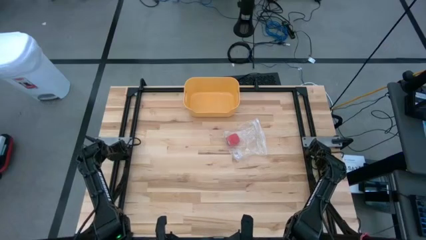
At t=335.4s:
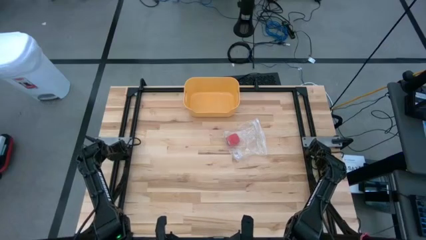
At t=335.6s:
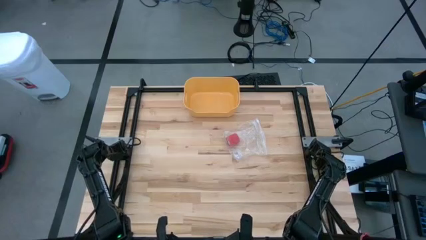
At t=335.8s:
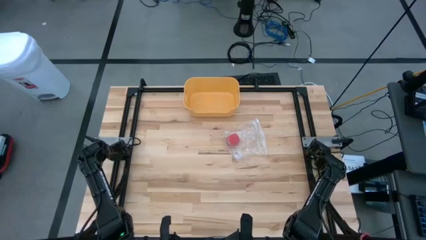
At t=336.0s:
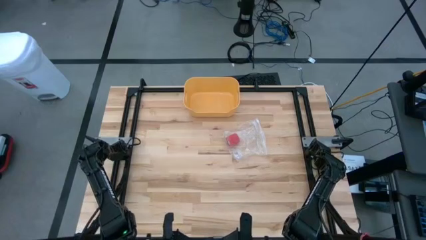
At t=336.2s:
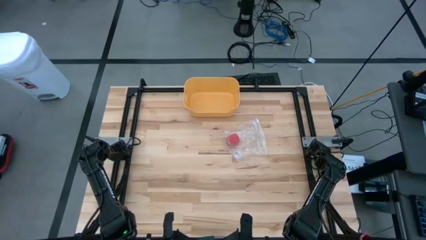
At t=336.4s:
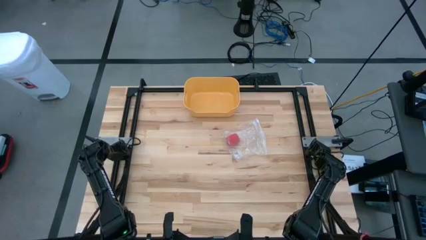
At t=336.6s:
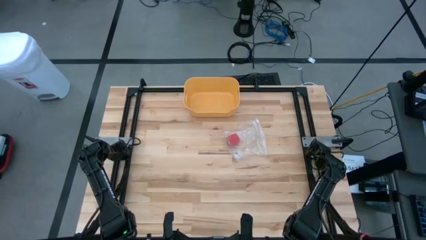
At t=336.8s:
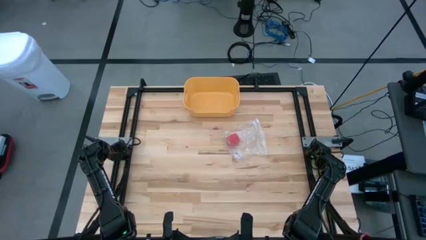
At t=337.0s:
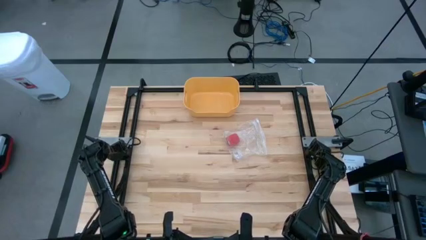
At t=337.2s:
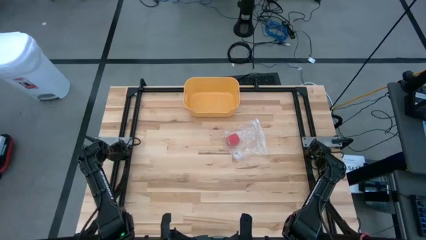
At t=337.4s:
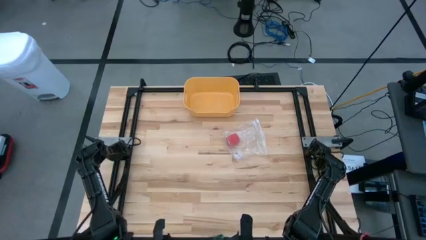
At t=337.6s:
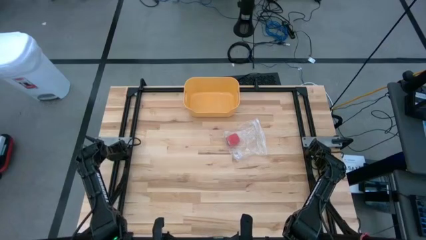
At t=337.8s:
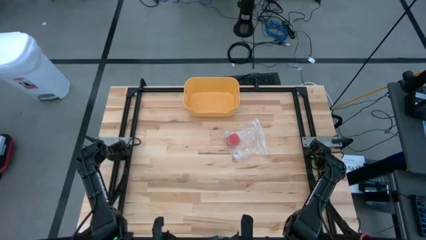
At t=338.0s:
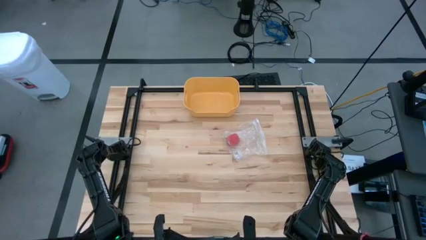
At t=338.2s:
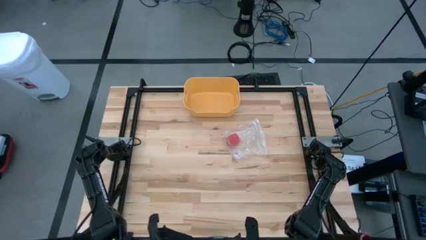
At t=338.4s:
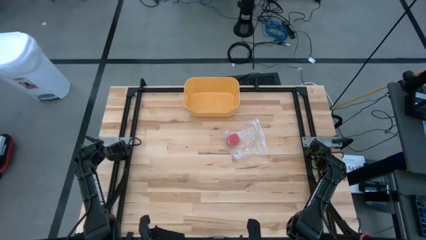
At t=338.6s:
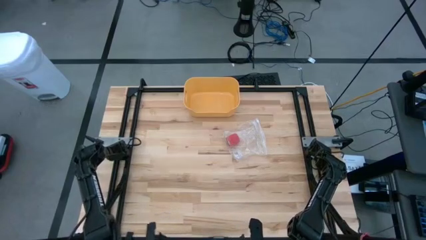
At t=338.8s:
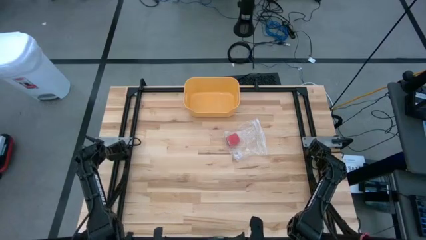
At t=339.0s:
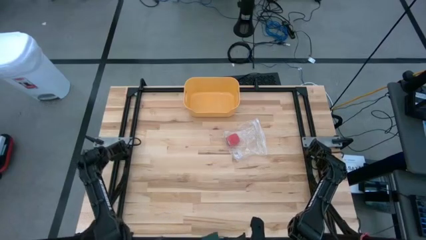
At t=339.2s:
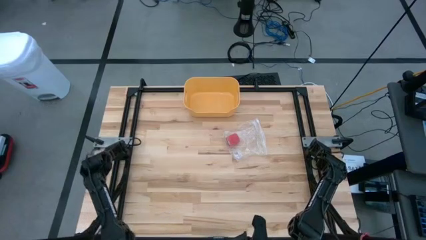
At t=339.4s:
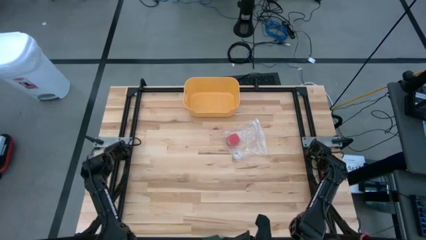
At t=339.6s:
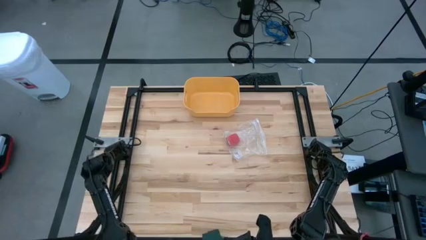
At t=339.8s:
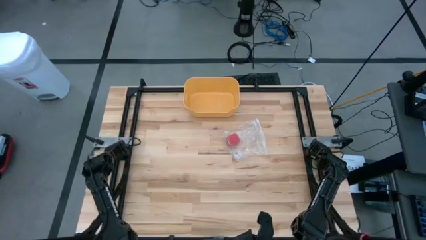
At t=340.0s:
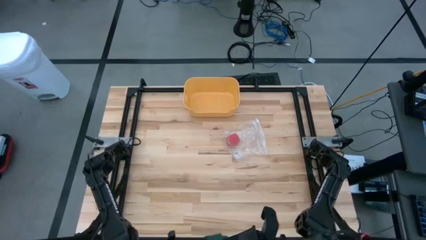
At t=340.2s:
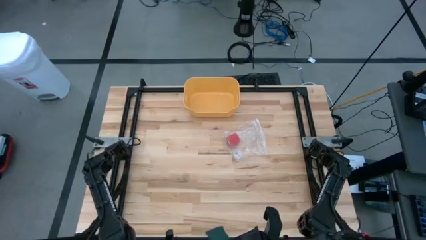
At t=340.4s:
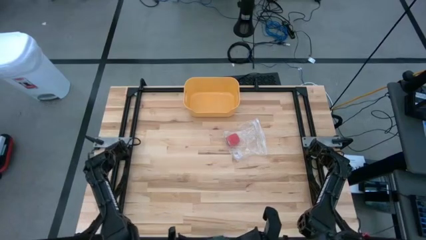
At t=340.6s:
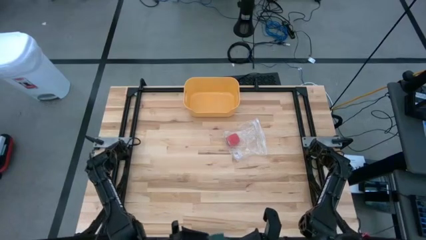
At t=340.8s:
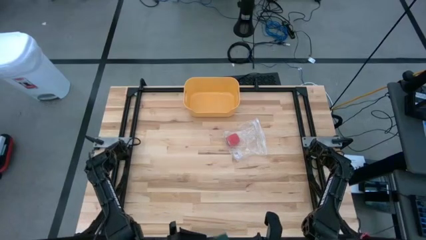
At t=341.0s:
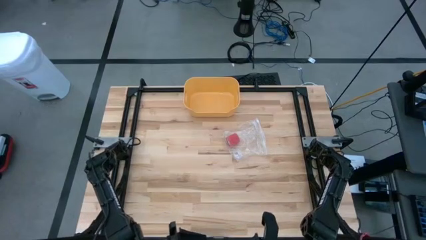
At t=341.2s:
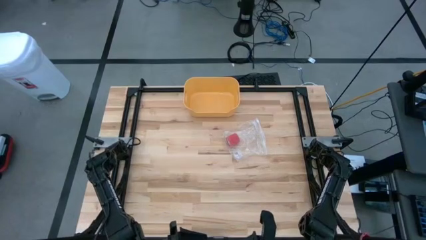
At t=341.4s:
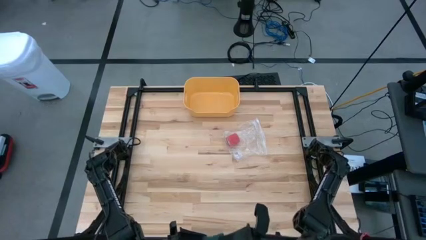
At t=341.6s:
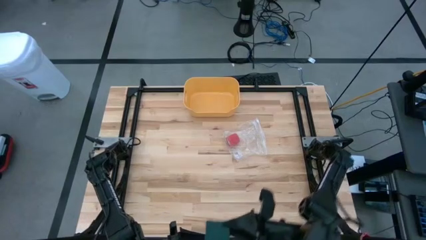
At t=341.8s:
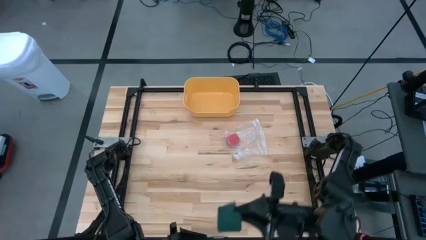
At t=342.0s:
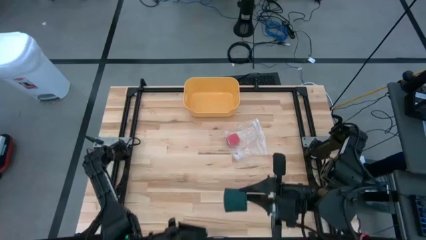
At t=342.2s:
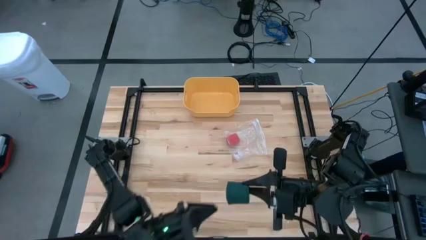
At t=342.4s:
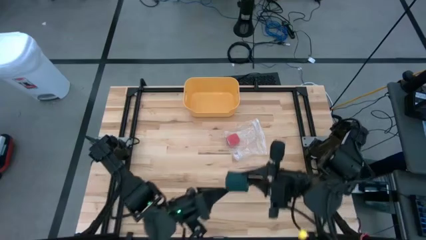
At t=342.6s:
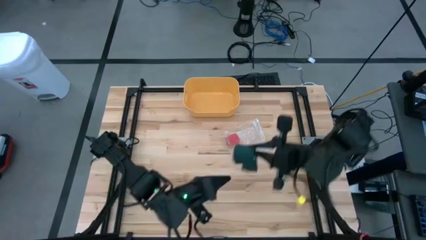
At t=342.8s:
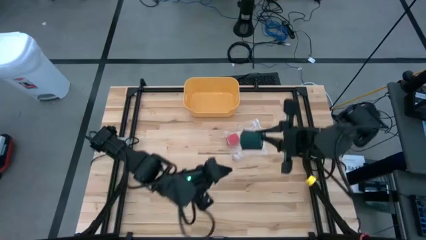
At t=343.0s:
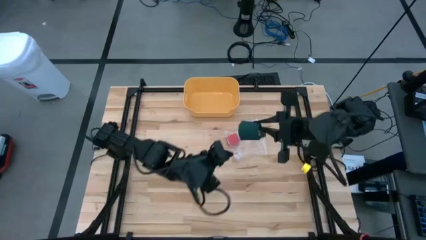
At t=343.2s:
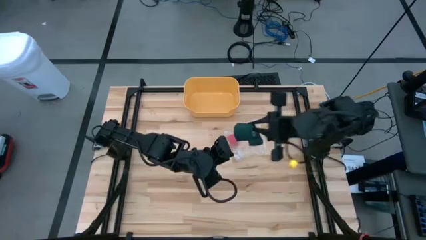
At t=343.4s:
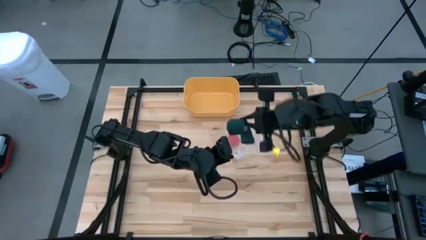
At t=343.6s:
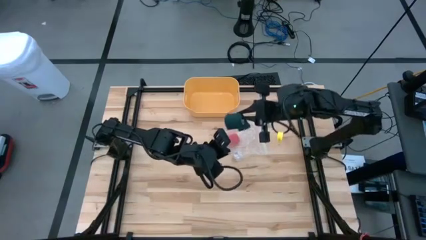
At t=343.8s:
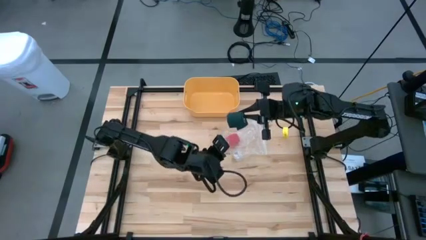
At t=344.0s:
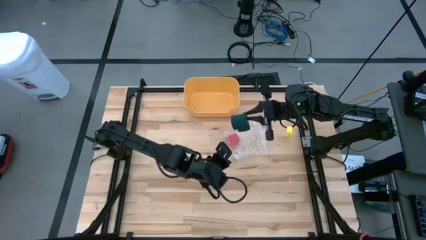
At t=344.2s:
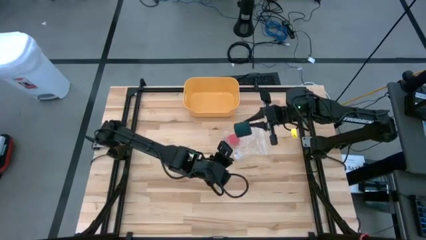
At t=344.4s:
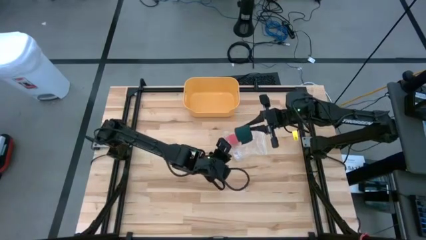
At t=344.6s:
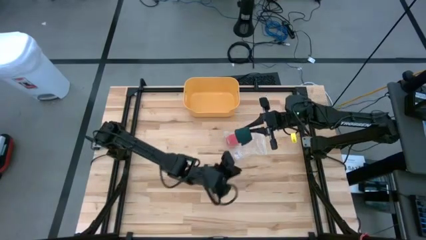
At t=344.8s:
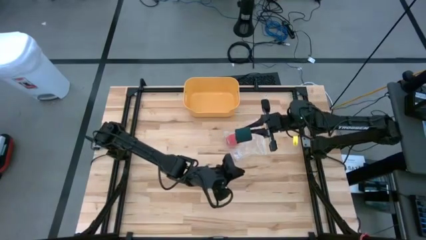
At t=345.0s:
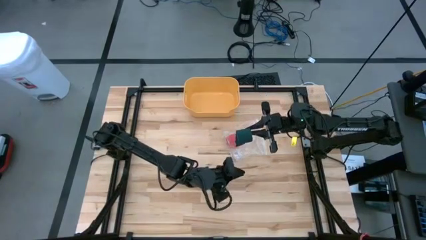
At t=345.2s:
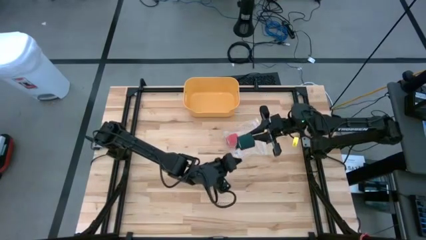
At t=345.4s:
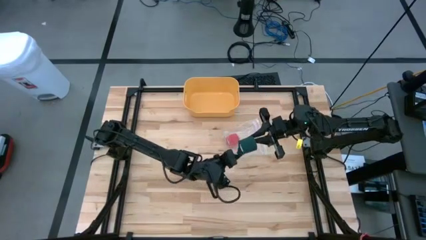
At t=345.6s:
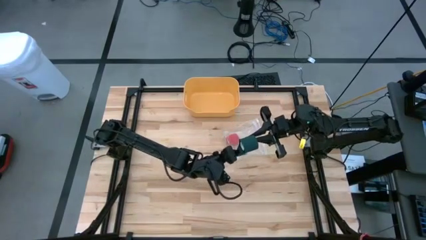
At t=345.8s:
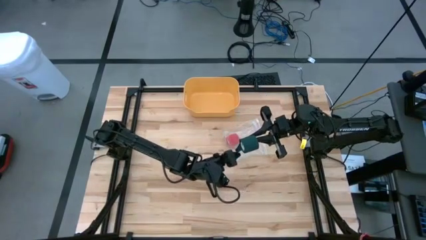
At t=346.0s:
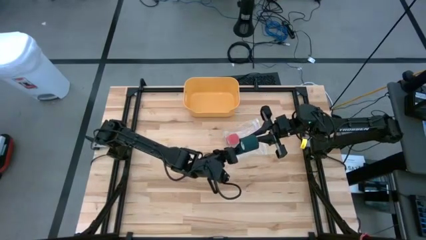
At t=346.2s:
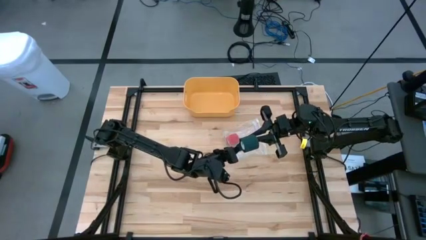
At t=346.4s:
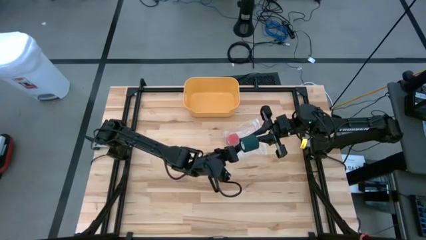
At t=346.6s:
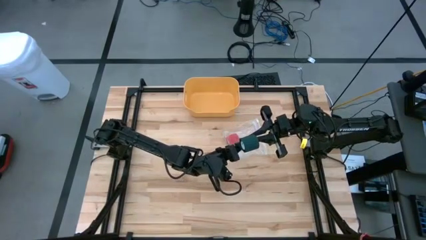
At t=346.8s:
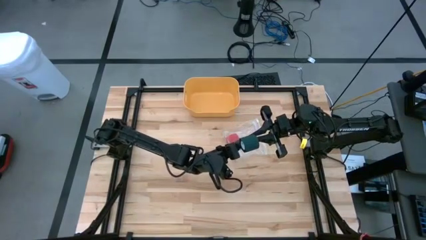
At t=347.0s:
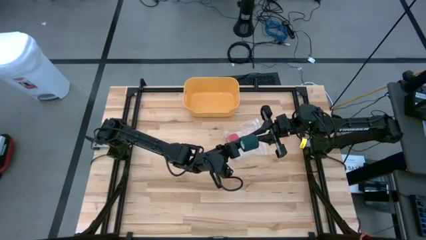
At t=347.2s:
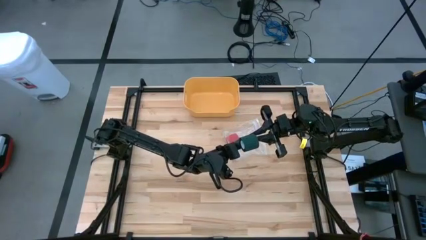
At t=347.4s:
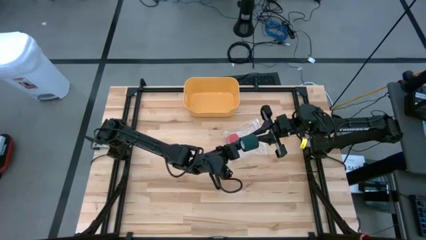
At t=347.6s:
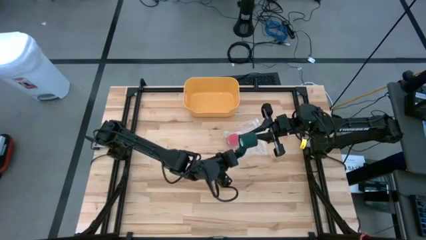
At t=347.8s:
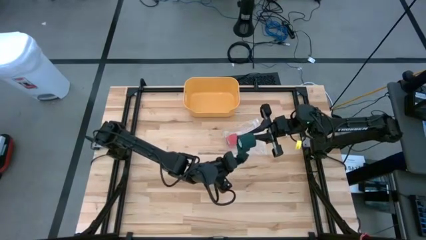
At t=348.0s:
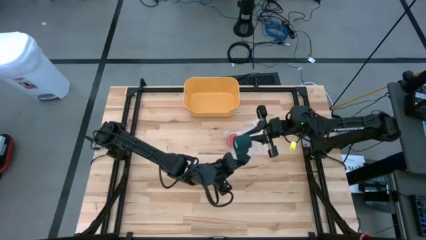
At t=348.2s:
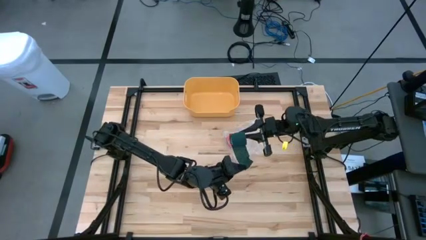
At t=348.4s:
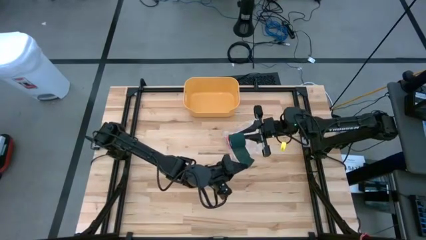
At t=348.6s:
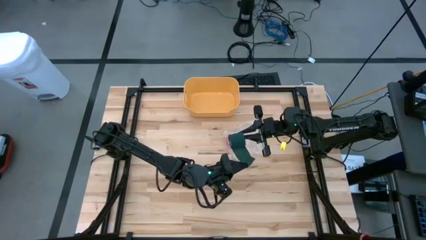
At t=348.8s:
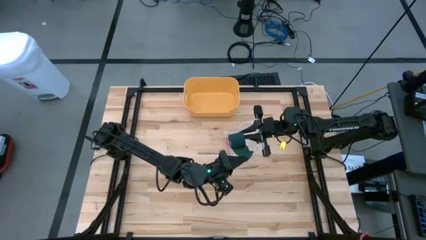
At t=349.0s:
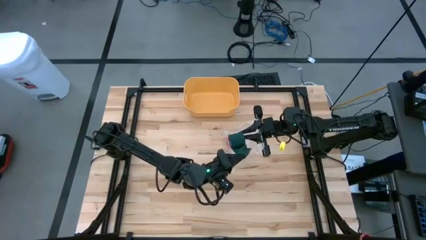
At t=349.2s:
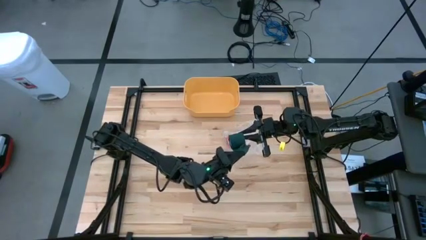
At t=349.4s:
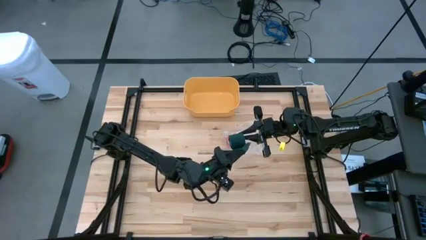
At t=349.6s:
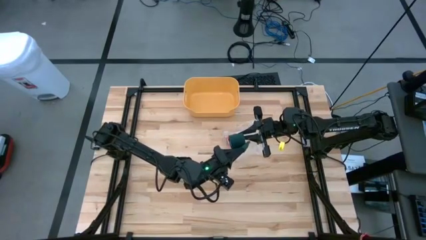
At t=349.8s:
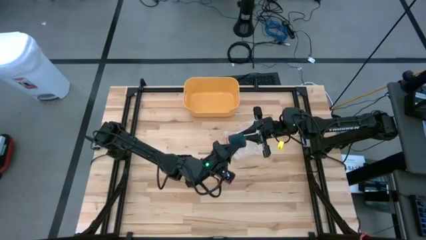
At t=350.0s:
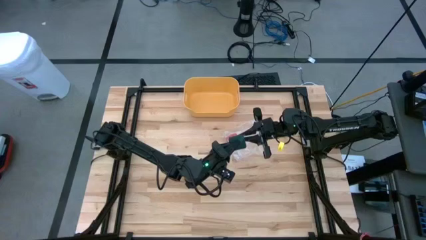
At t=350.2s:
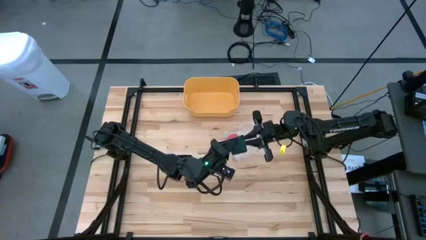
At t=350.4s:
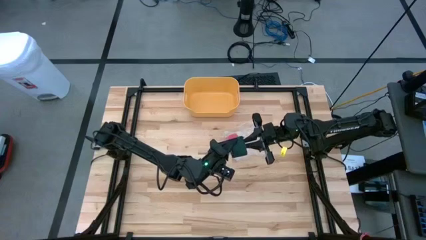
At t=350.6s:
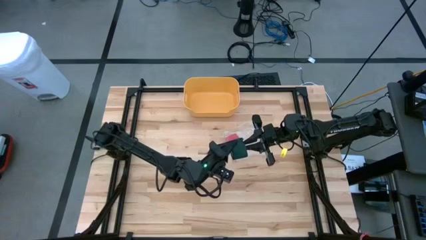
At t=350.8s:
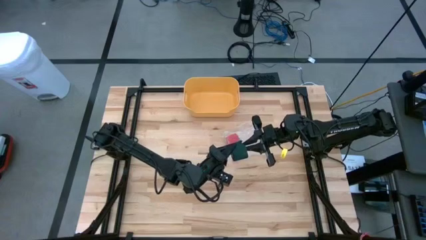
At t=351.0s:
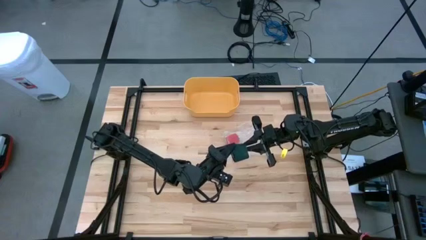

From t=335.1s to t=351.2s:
Task: Roll bandage
Roll the green bandage
